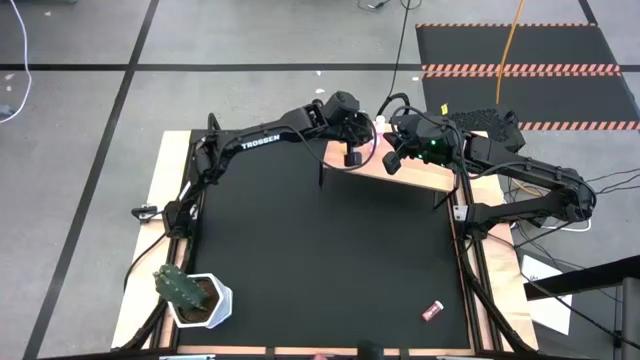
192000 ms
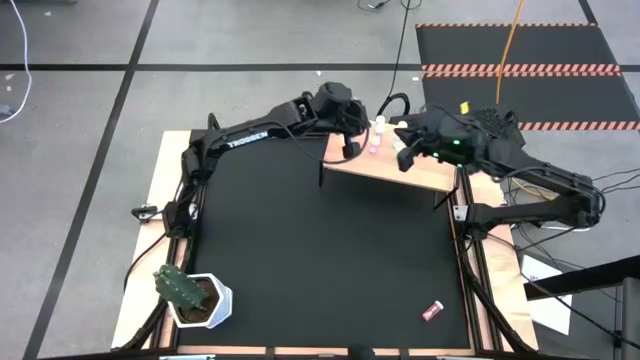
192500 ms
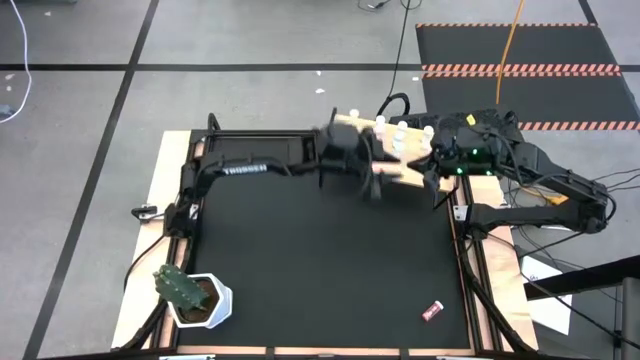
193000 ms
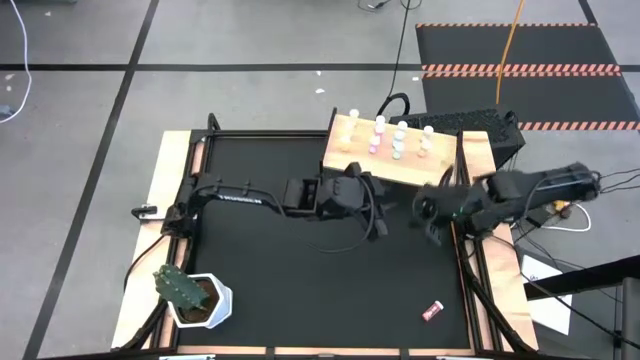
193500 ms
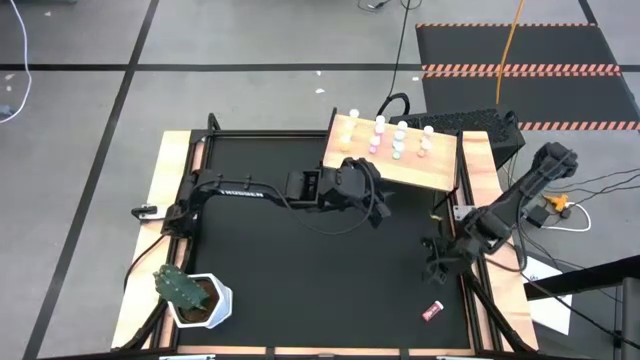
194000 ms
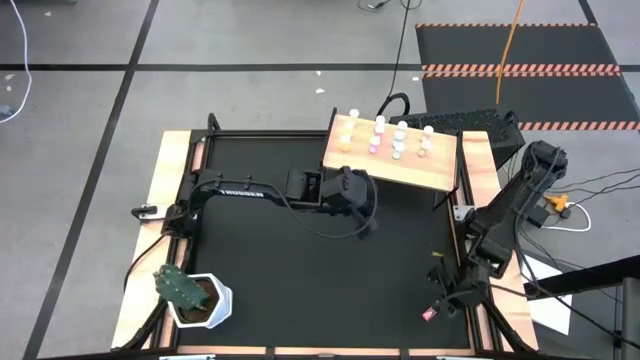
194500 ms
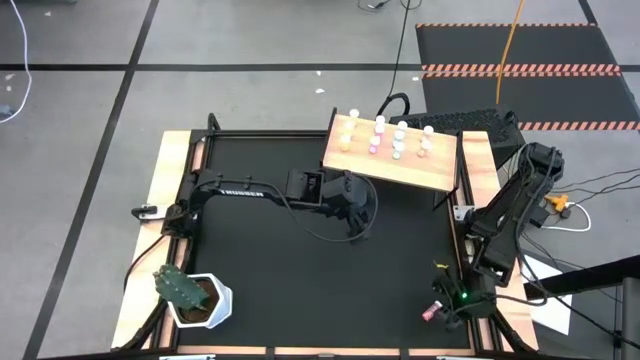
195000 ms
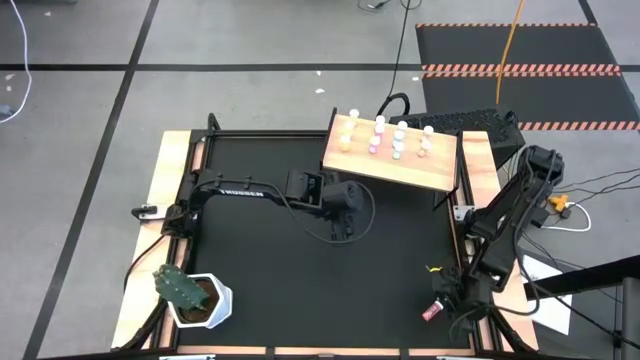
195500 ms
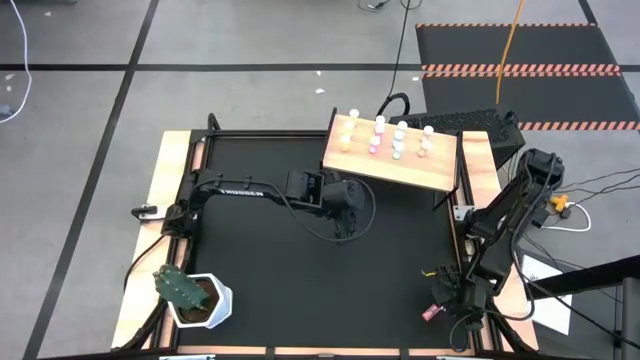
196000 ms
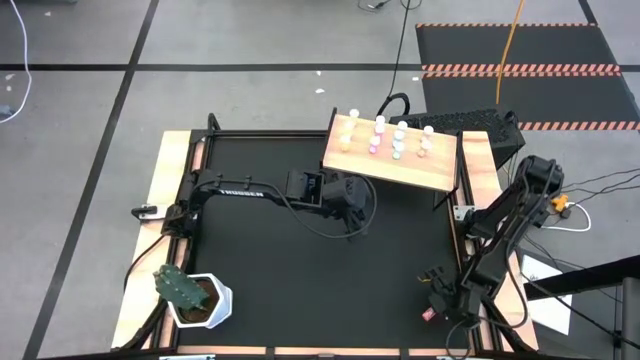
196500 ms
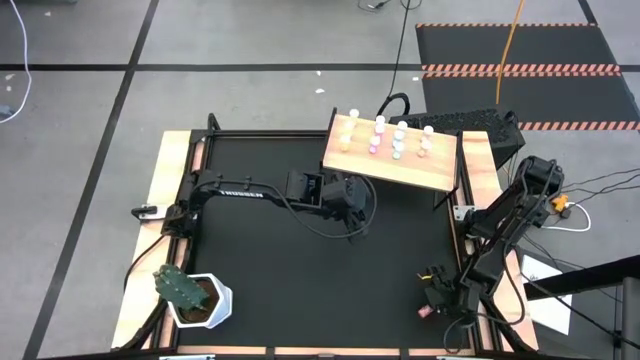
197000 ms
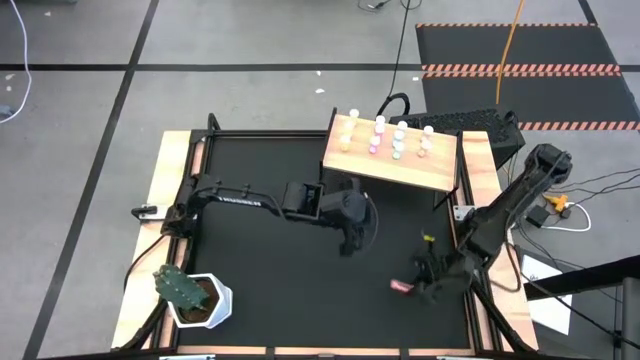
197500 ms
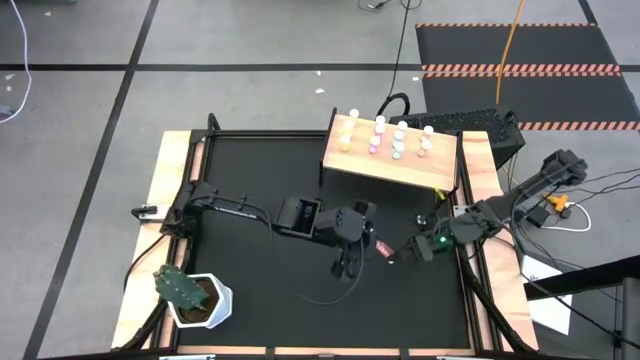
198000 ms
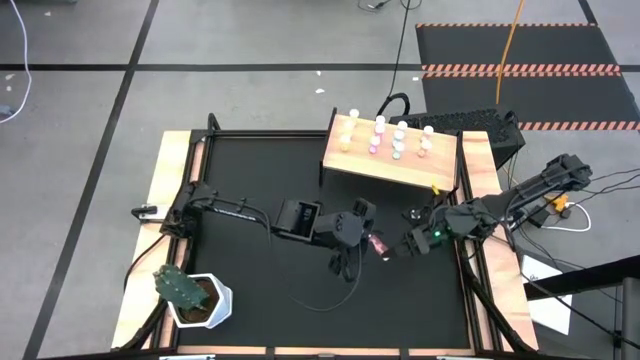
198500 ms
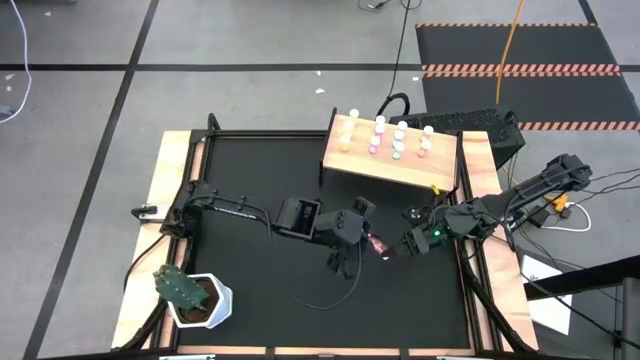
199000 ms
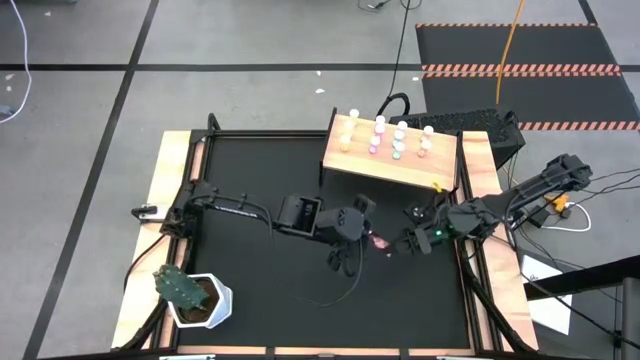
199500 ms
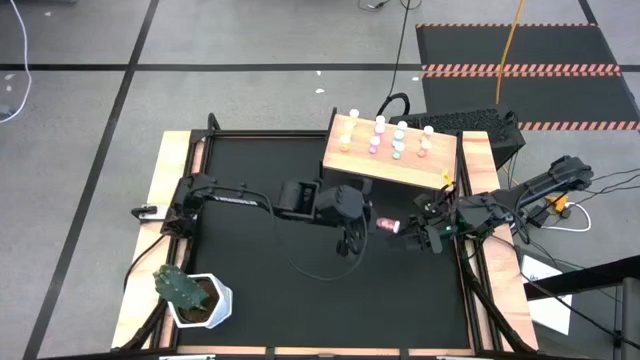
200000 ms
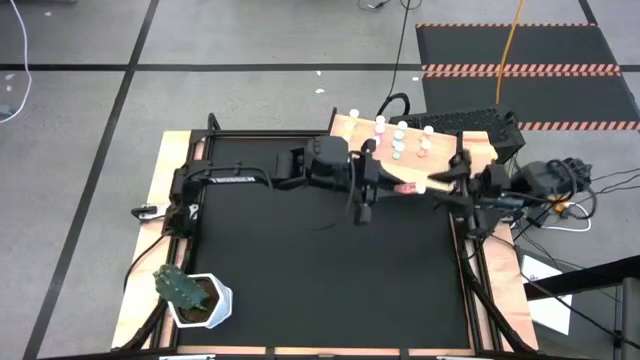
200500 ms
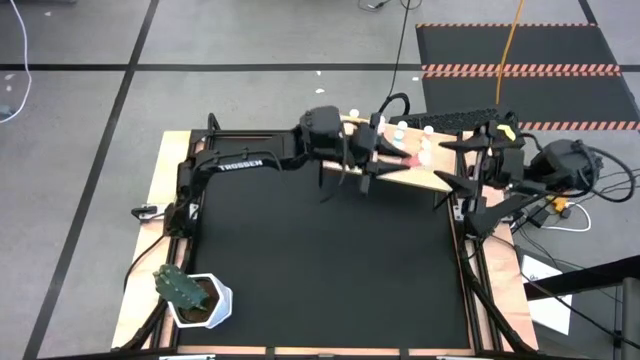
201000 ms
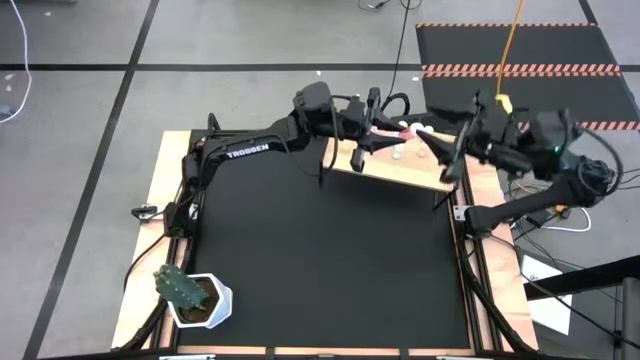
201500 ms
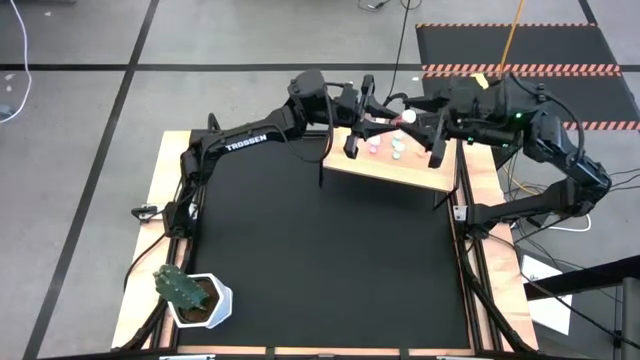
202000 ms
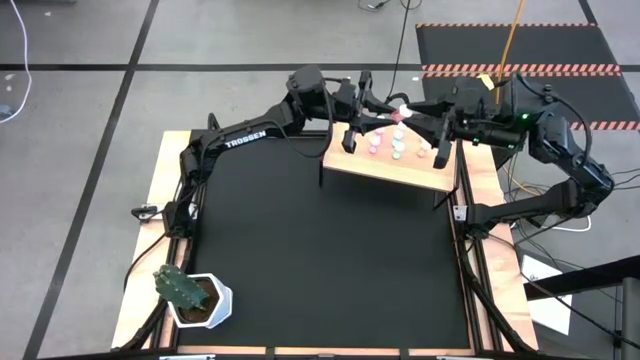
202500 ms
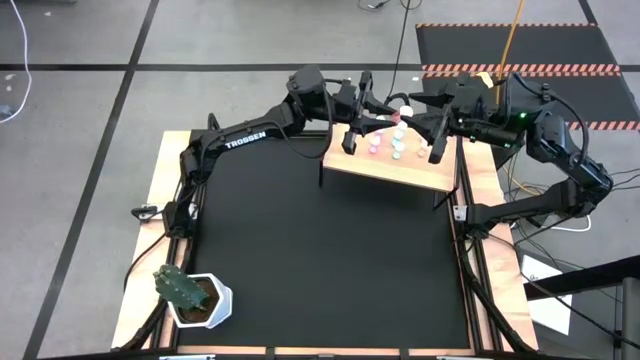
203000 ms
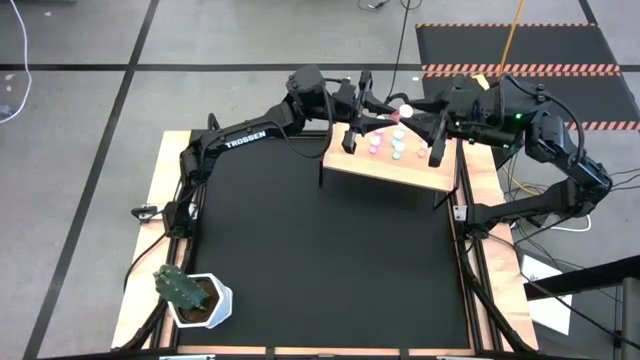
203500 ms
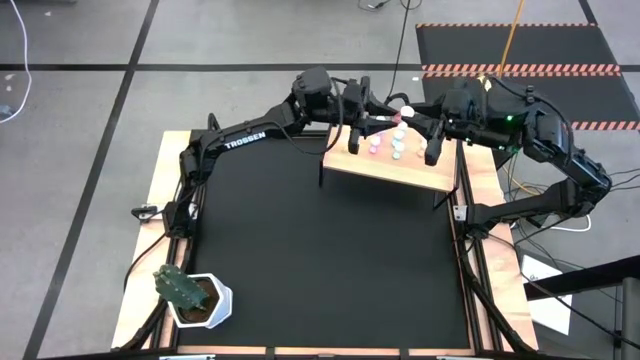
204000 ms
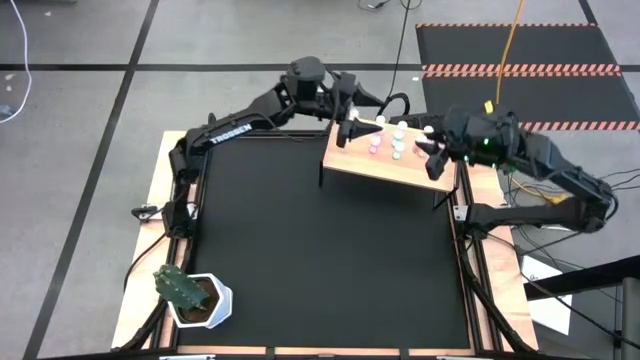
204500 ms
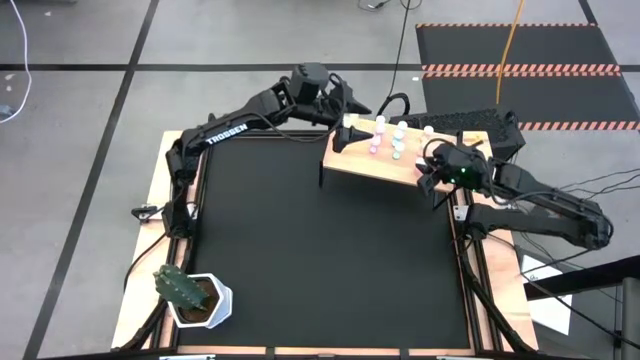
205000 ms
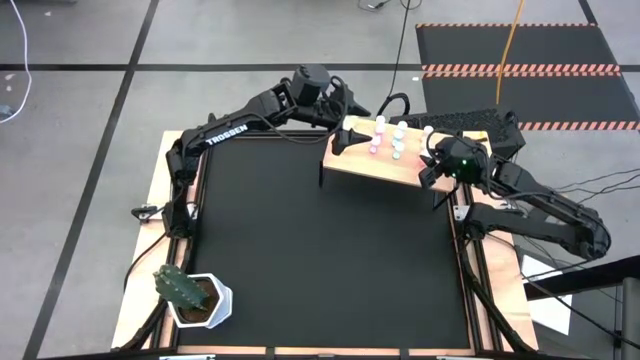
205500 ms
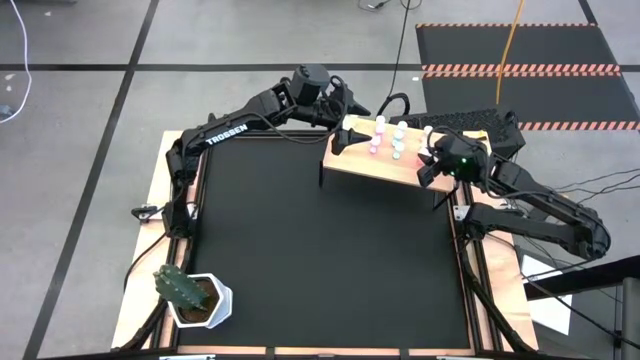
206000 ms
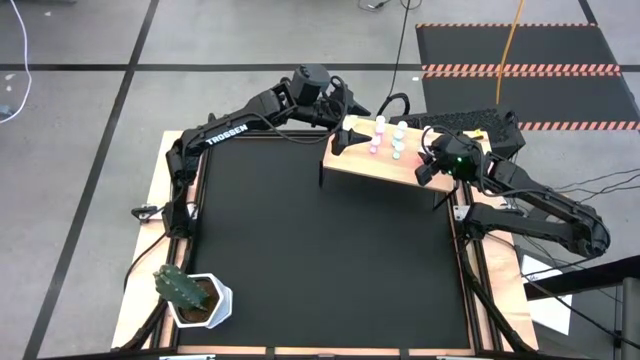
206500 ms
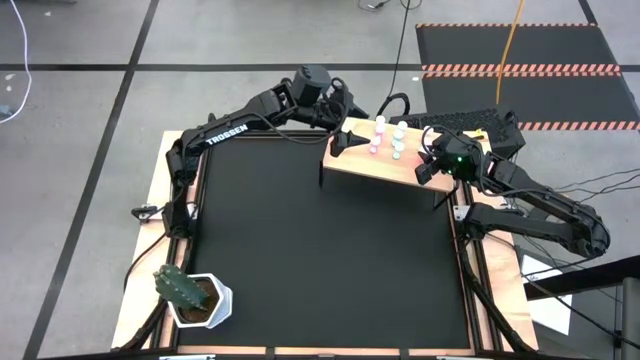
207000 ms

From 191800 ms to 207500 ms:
Task: Pick and place medicine bottles onto shelf by color
Put the orange pill bottle on the shelf aligned with the other orange pill bottles

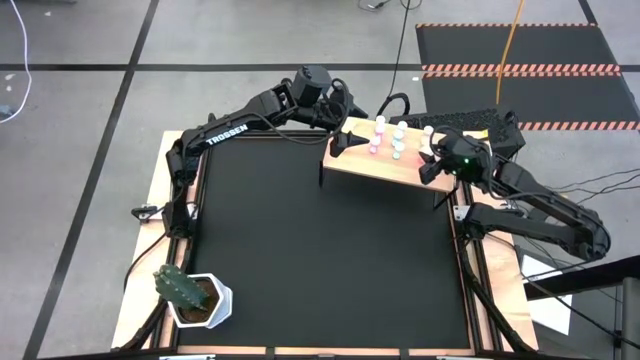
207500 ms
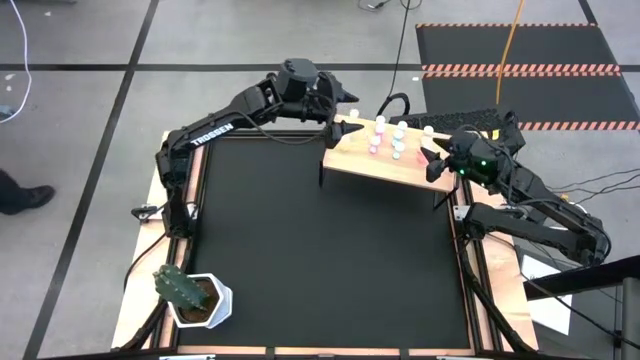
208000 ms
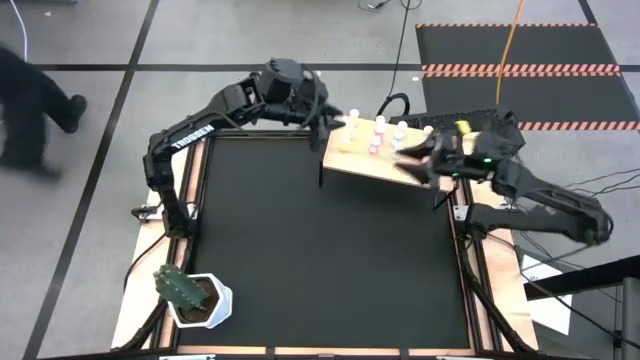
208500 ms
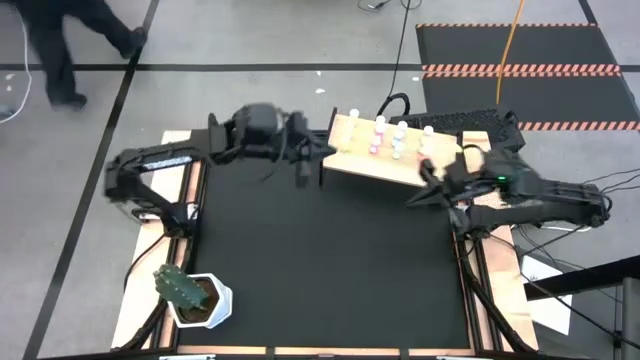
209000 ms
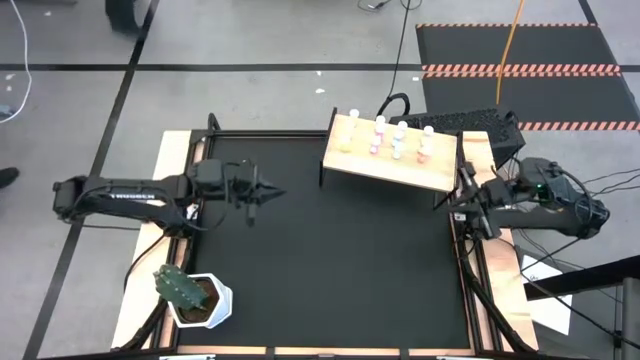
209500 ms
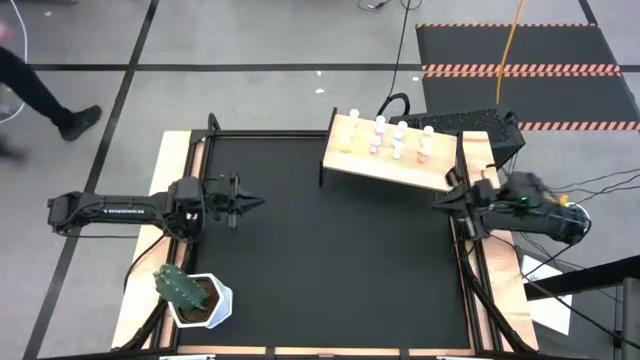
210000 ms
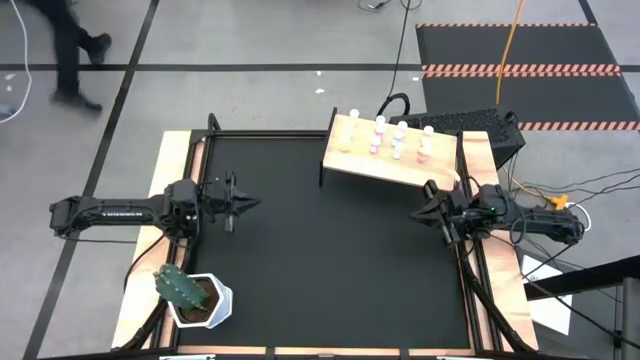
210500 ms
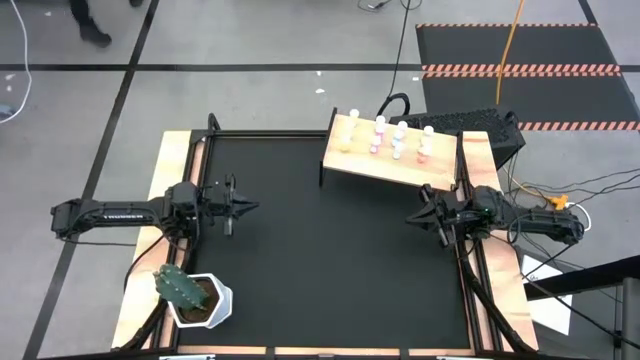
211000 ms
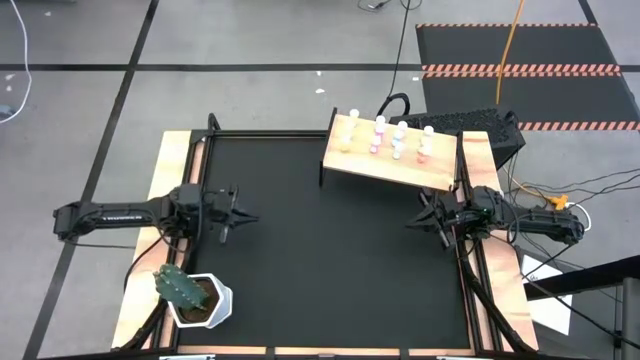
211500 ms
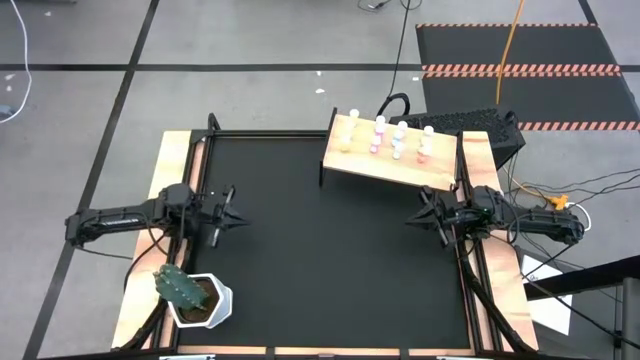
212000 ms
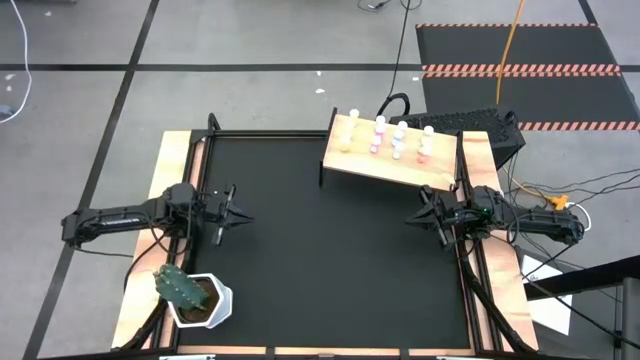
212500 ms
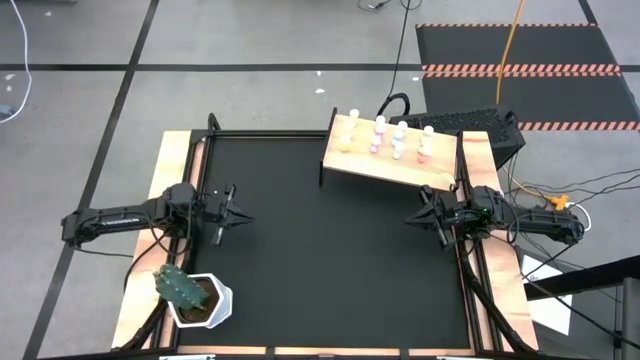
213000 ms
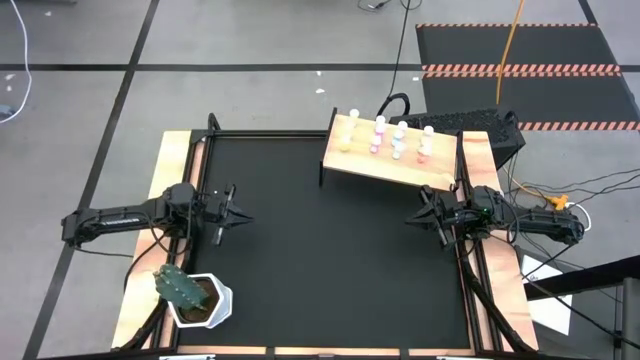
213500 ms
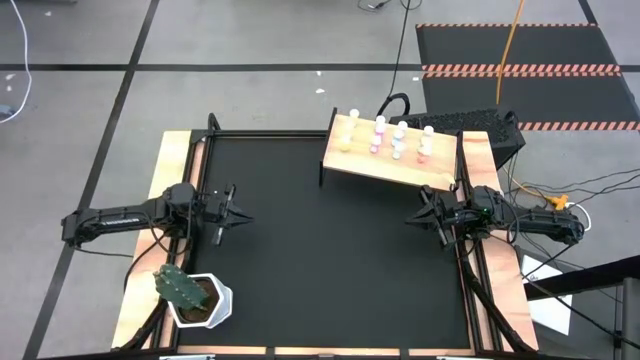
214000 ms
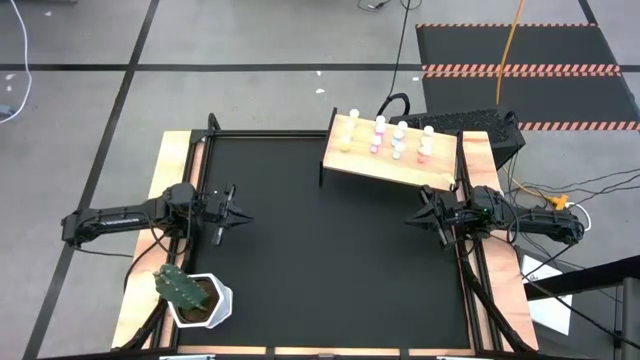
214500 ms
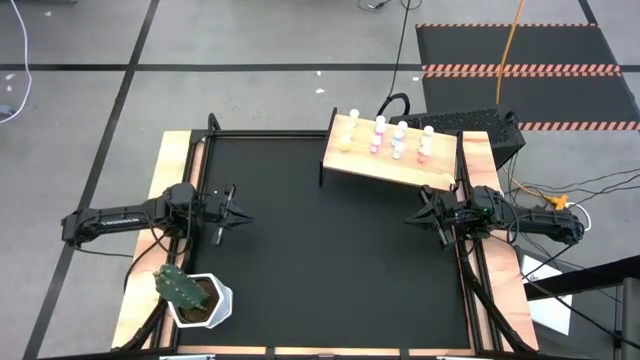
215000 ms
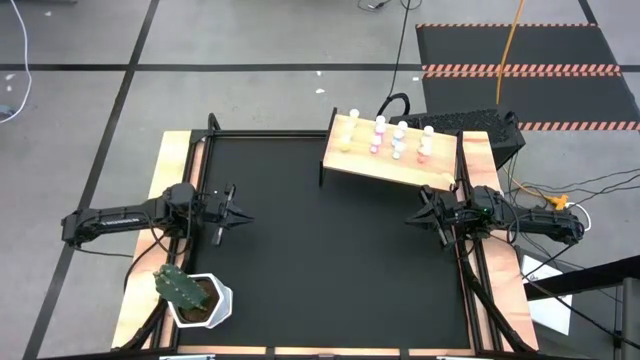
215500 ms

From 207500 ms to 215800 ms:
Return to Home Position
